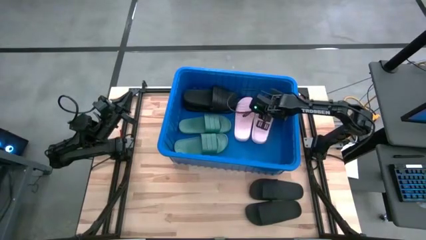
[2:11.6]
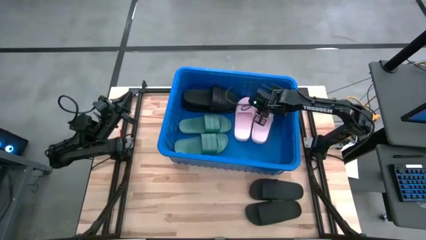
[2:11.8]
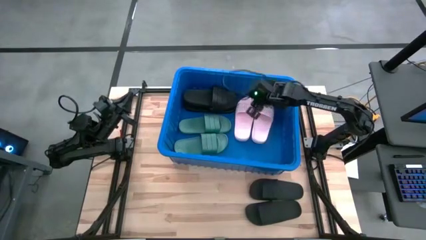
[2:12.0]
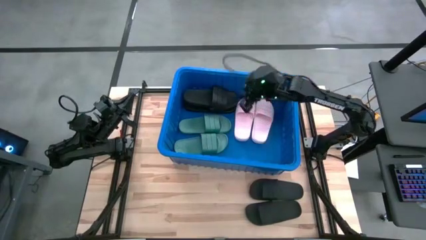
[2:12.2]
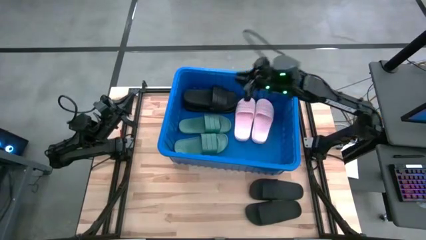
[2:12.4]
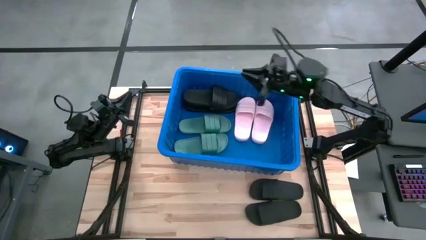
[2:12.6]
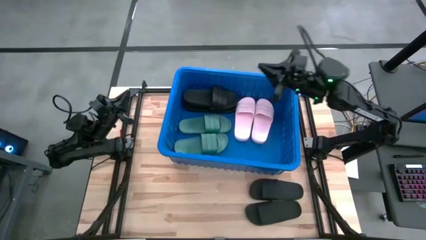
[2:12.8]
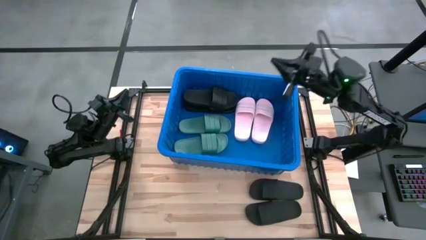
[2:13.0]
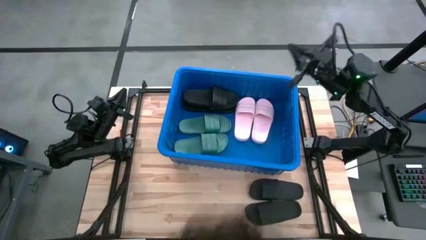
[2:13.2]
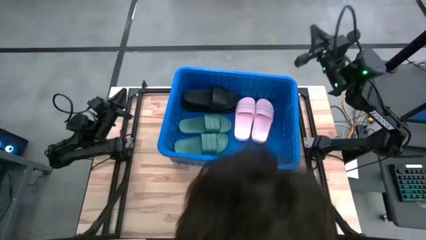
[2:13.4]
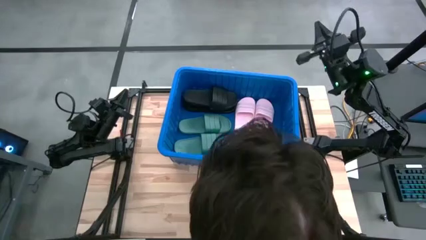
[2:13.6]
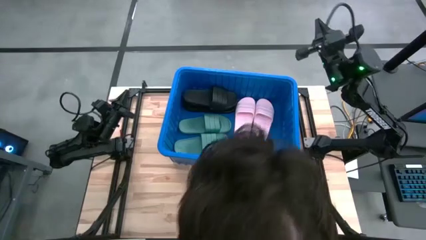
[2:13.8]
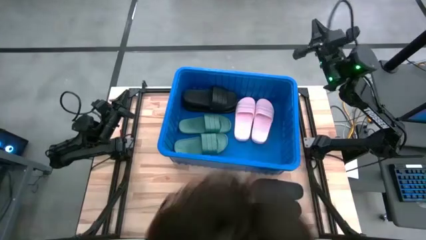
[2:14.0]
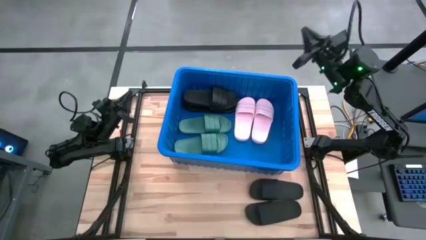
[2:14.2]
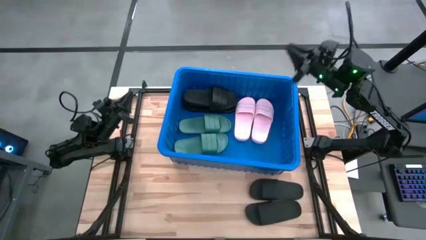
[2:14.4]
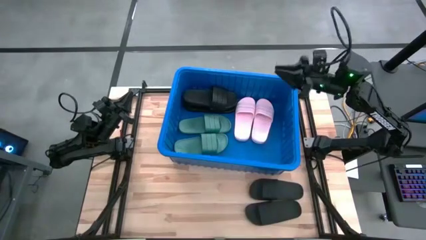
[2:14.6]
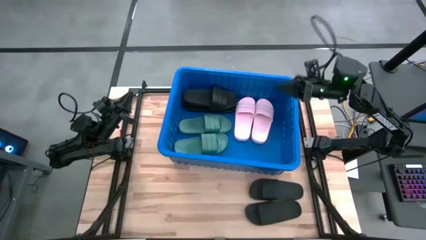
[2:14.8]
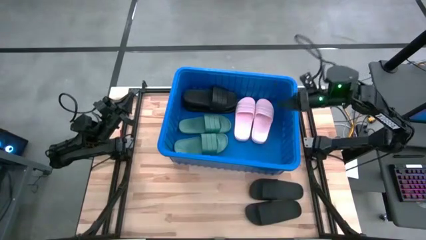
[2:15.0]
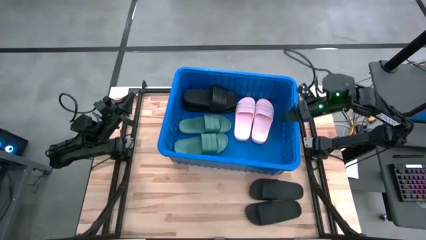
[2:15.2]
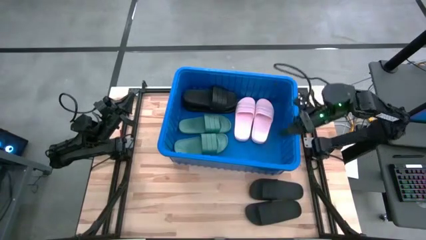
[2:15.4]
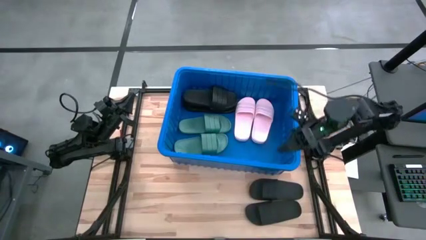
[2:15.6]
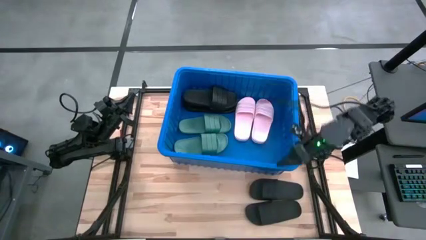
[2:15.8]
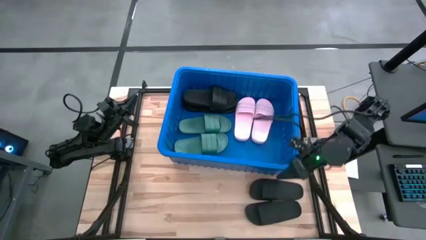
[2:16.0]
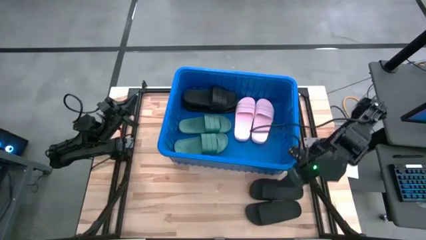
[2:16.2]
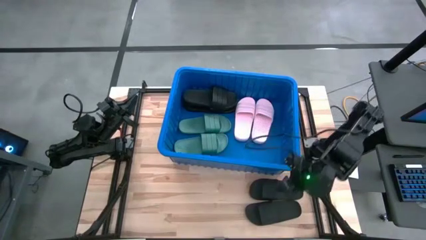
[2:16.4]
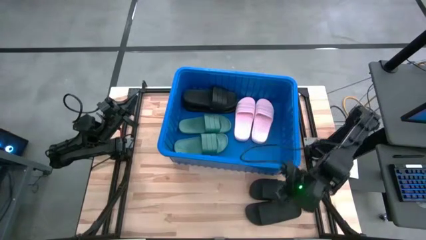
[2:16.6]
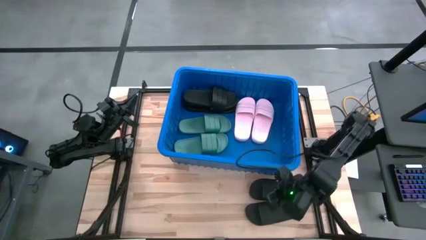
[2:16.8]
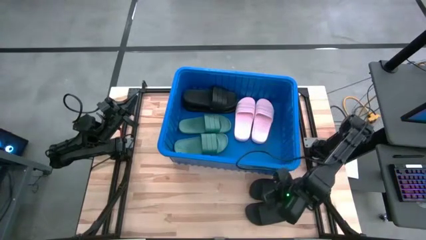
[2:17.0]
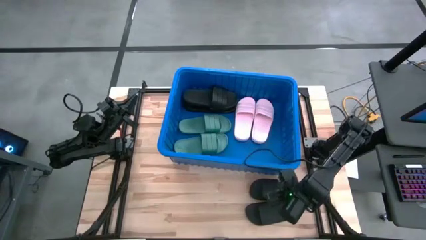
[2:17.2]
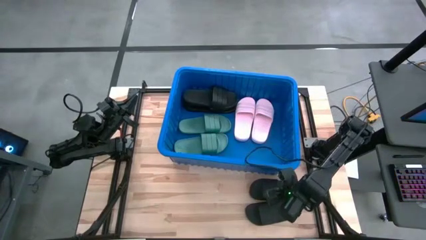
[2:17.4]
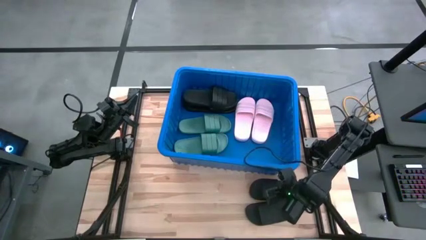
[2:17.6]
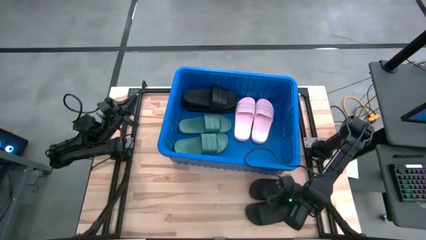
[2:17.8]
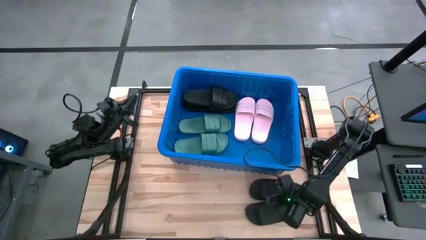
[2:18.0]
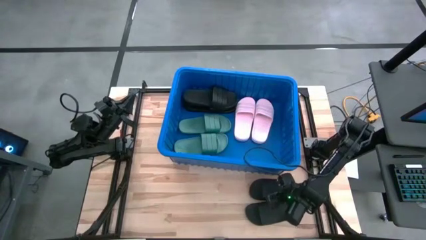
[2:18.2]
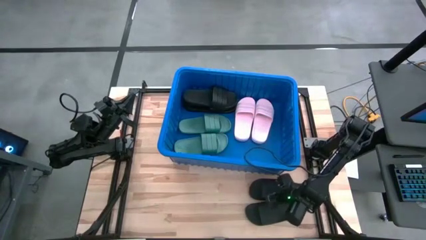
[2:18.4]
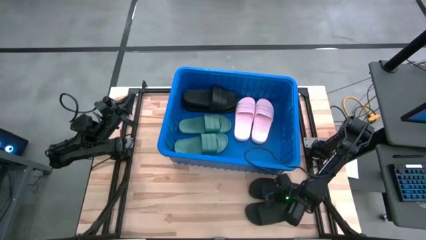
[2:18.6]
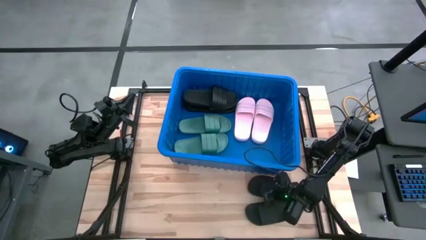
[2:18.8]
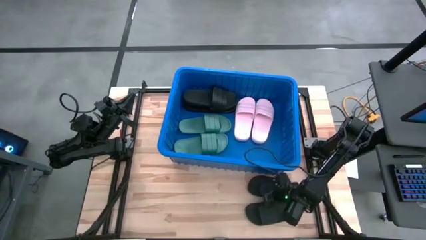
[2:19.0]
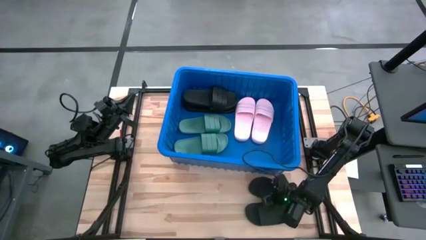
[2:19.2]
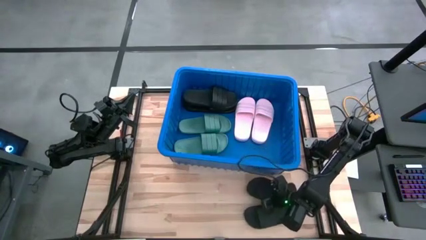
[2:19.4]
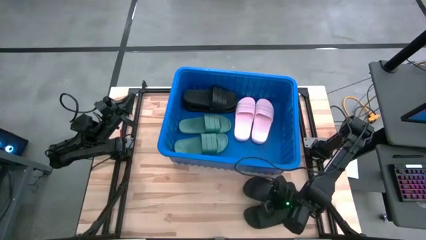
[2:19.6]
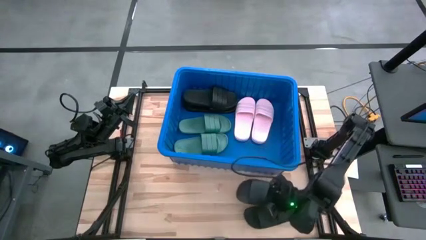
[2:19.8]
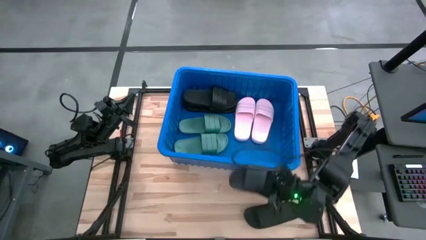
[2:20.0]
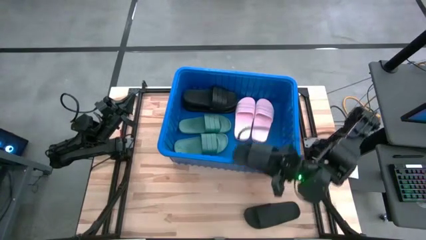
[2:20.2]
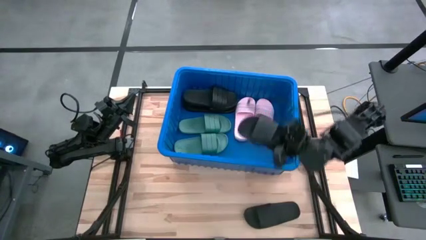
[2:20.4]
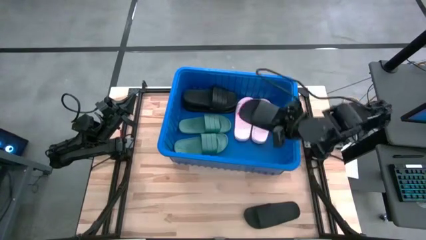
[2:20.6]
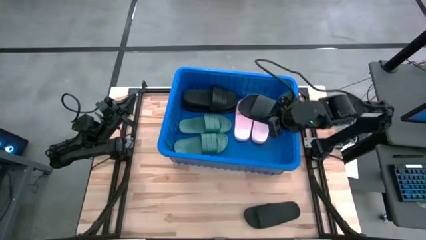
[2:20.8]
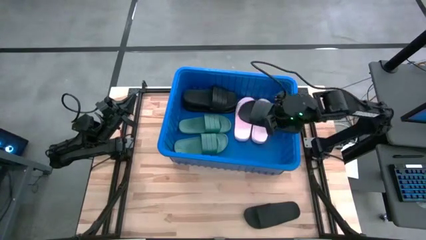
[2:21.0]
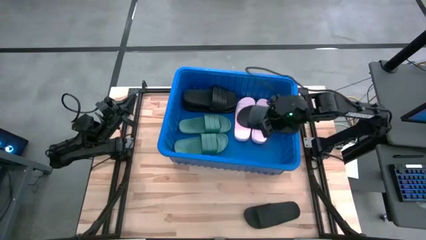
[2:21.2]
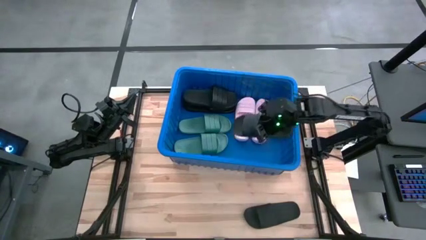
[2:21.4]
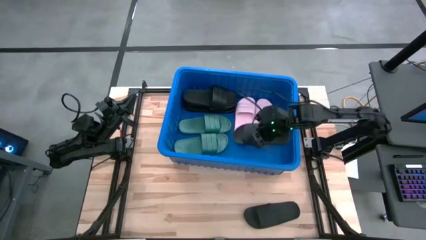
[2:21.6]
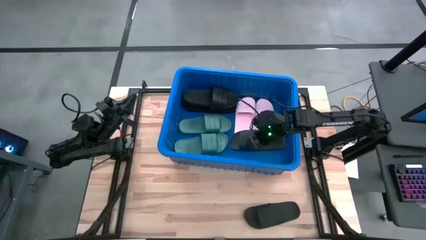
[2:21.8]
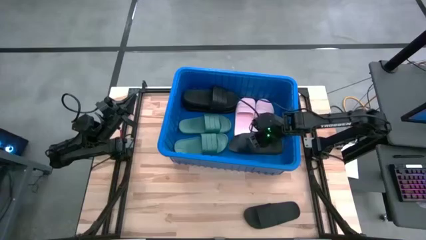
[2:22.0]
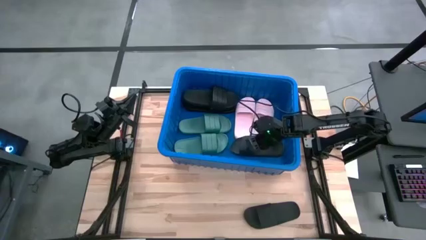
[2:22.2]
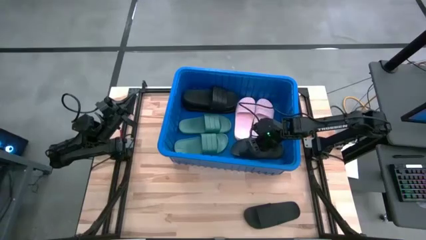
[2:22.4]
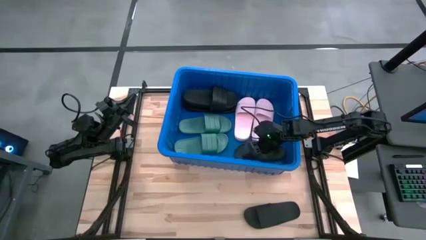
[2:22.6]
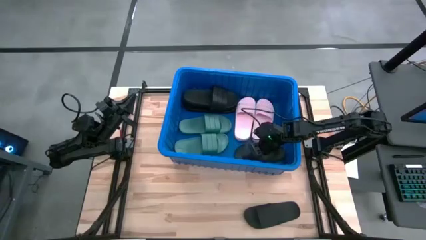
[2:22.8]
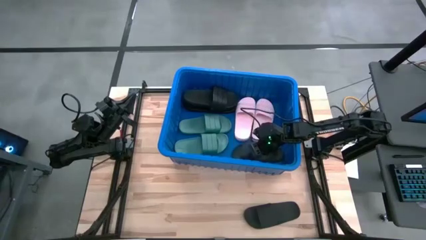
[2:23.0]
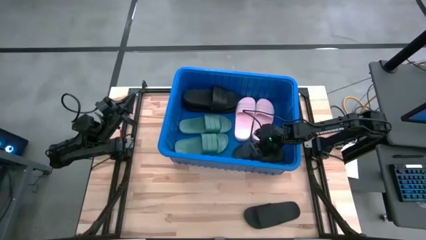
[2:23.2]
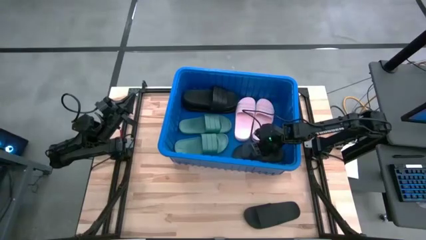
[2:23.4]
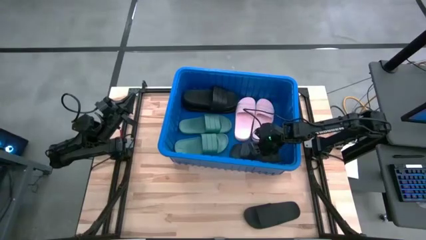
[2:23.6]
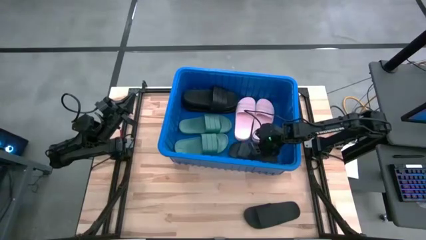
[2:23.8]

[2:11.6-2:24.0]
Task: Pick and place slides into bin
Put the black slipper into the blue bin

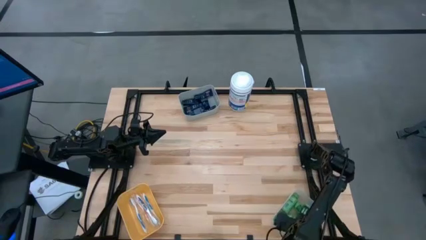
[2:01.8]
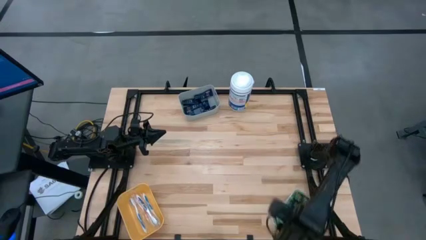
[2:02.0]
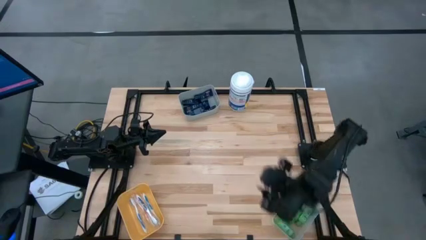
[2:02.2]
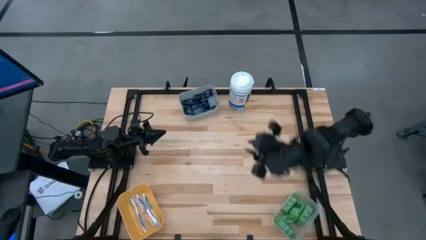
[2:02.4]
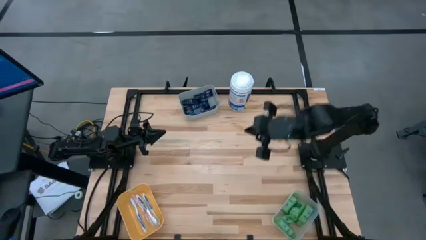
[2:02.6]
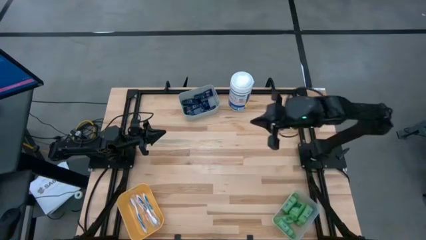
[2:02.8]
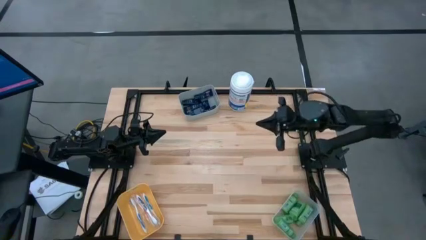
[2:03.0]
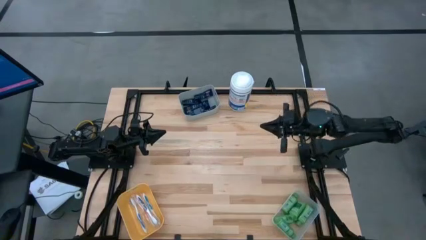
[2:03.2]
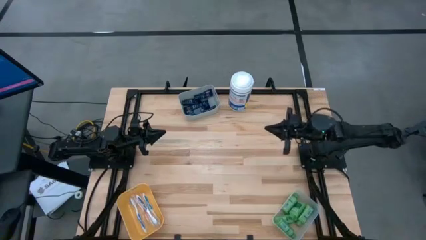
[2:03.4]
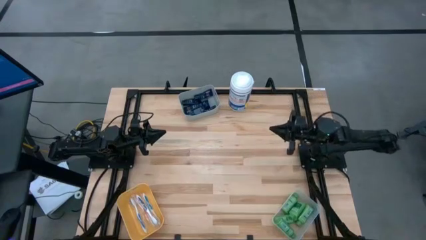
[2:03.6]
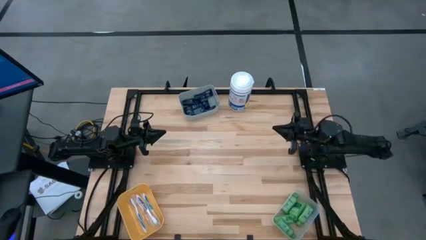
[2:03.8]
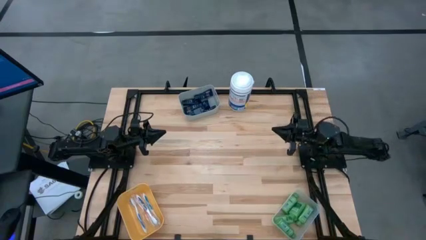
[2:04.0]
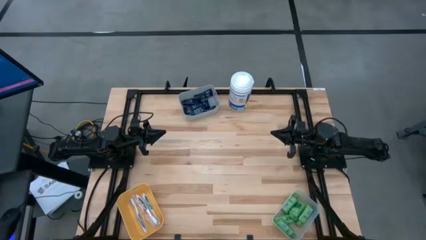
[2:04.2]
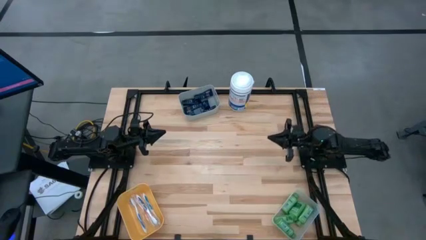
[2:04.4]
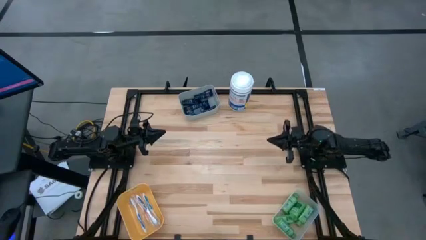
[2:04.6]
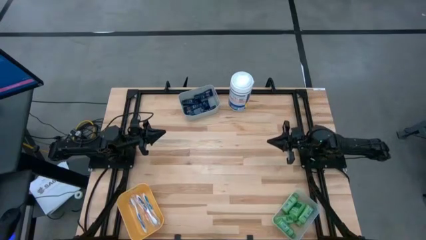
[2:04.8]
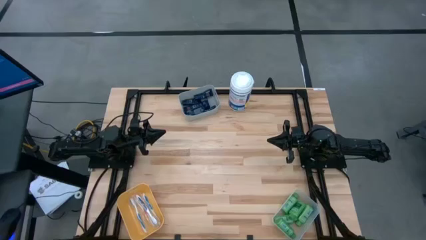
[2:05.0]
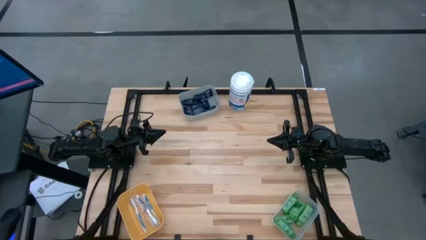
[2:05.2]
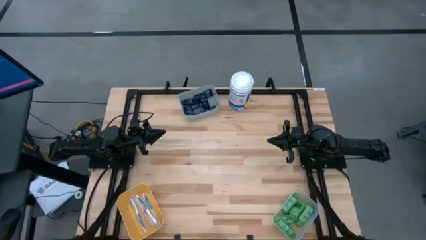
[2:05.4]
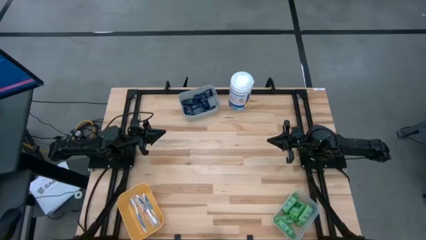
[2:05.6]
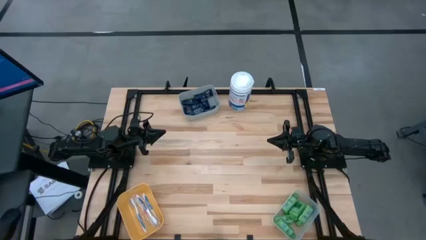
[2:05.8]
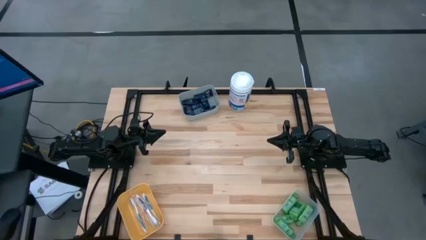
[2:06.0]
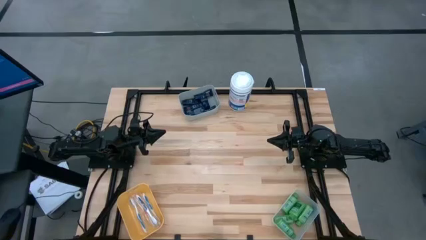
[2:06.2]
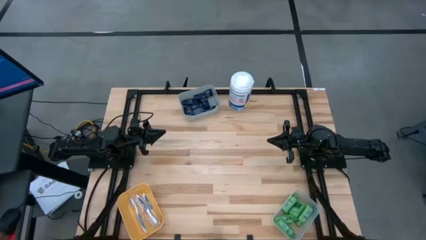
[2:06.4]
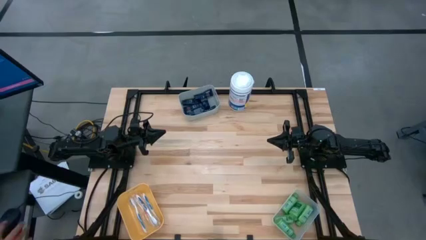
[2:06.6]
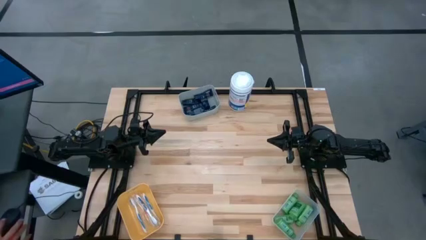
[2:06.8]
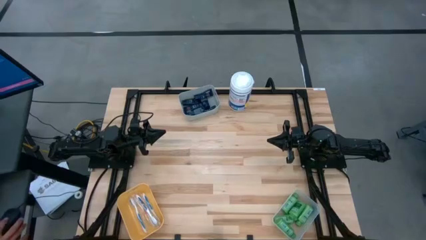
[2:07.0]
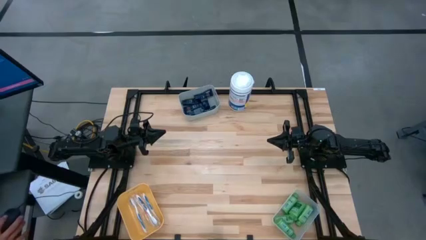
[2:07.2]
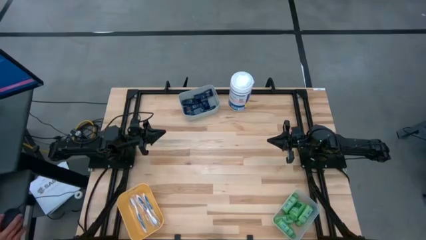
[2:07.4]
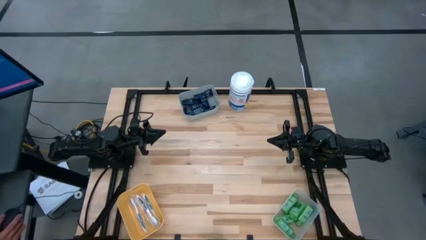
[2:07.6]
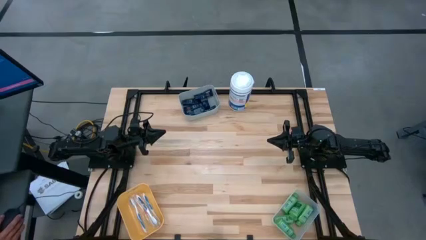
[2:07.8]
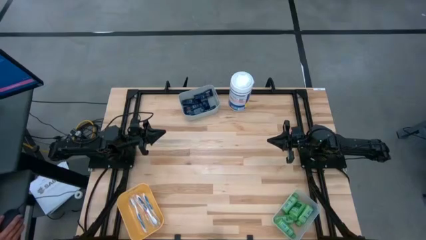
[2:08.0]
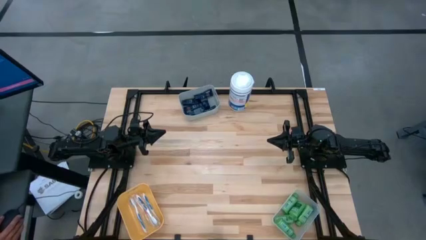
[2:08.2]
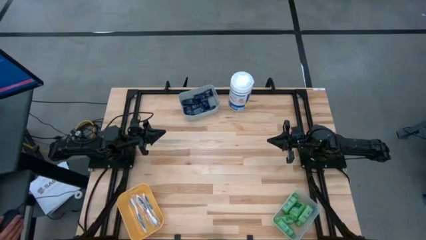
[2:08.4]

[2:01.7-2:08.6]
Task: Pick & Place Travel size toiletries
Return to Home Position
